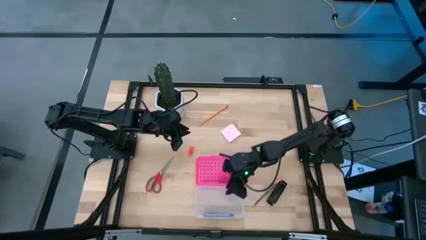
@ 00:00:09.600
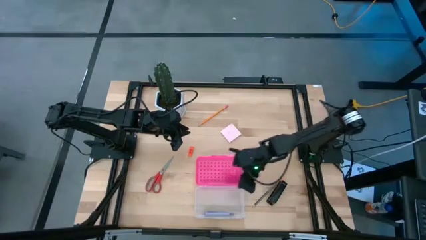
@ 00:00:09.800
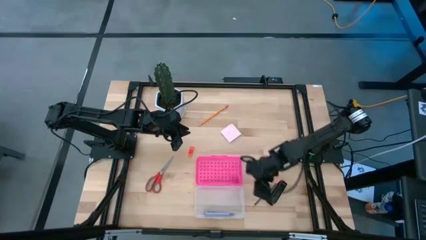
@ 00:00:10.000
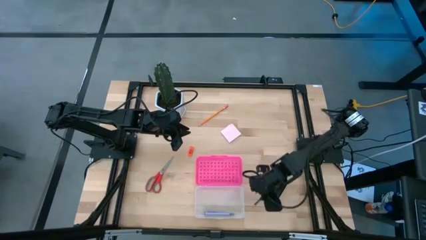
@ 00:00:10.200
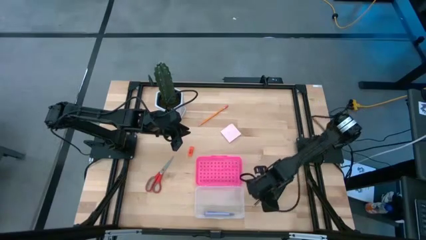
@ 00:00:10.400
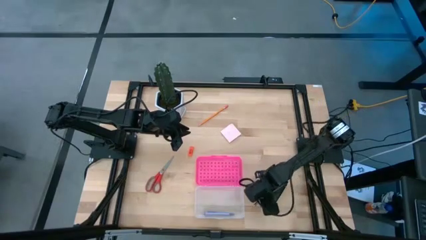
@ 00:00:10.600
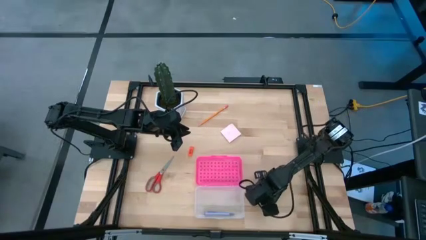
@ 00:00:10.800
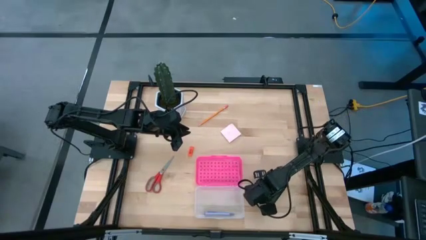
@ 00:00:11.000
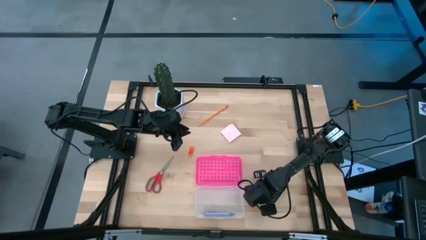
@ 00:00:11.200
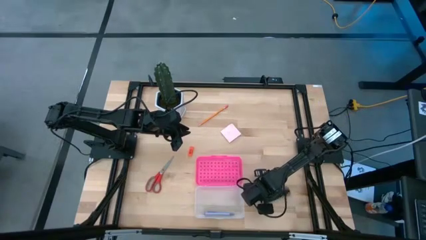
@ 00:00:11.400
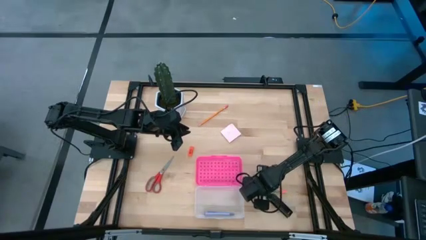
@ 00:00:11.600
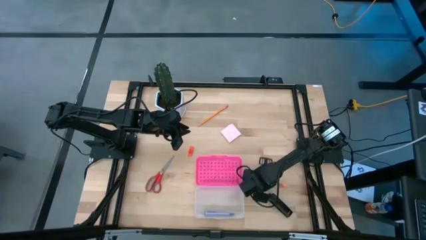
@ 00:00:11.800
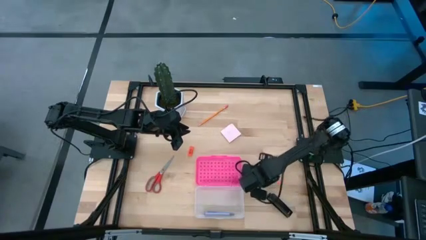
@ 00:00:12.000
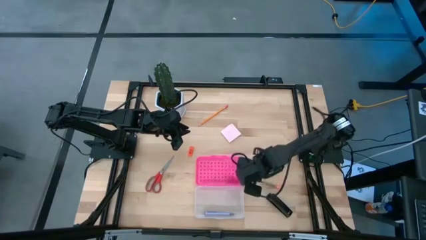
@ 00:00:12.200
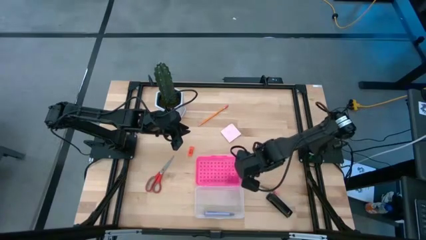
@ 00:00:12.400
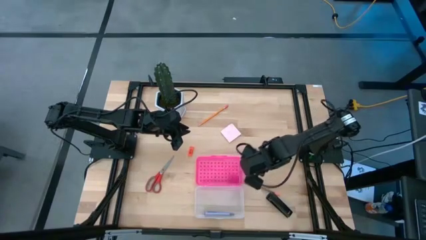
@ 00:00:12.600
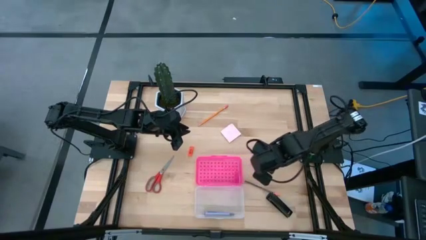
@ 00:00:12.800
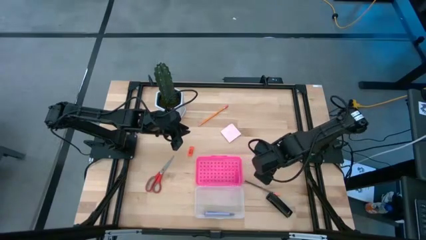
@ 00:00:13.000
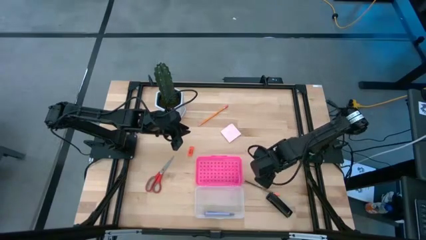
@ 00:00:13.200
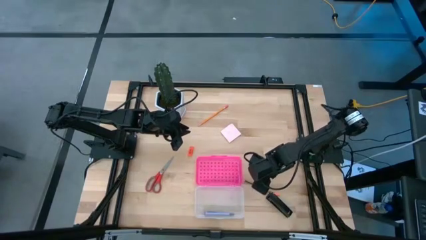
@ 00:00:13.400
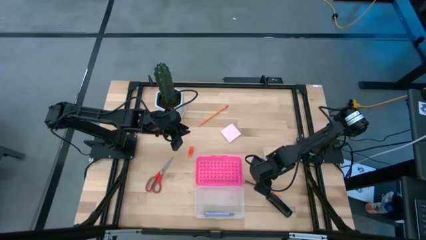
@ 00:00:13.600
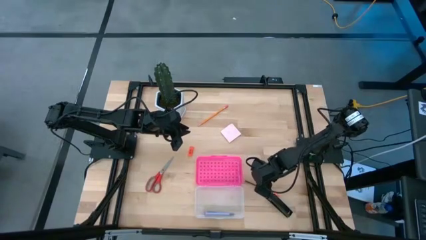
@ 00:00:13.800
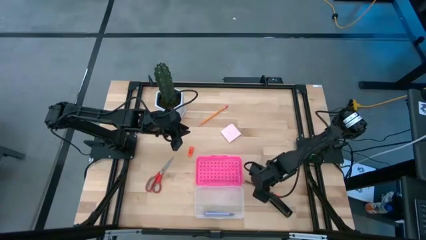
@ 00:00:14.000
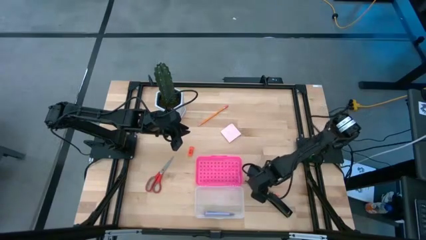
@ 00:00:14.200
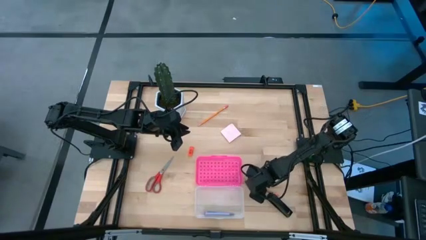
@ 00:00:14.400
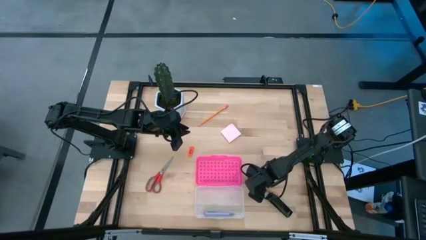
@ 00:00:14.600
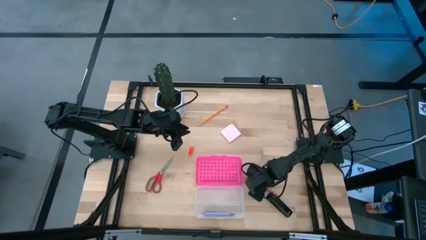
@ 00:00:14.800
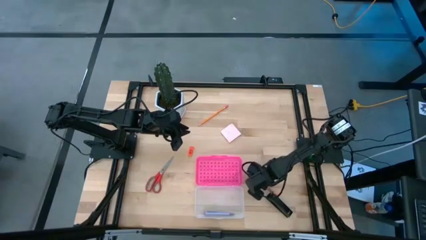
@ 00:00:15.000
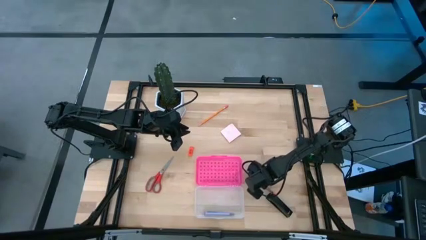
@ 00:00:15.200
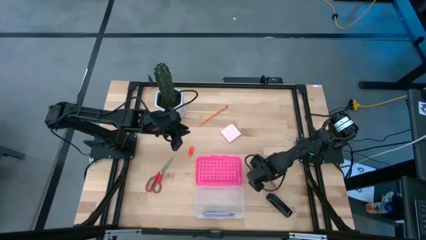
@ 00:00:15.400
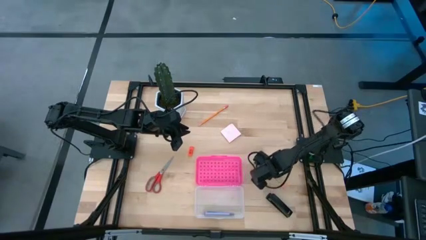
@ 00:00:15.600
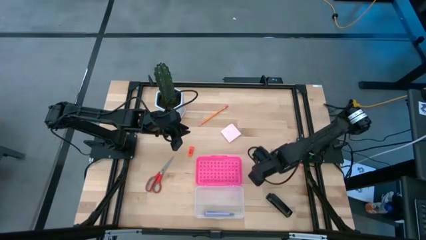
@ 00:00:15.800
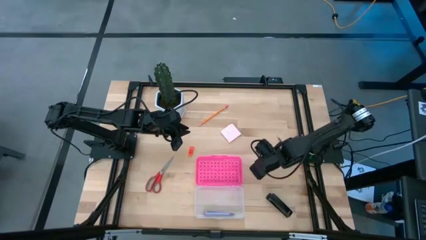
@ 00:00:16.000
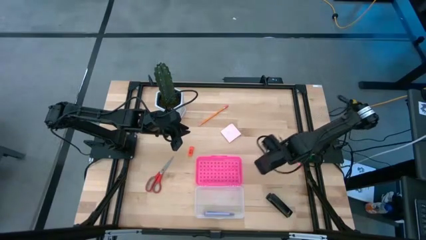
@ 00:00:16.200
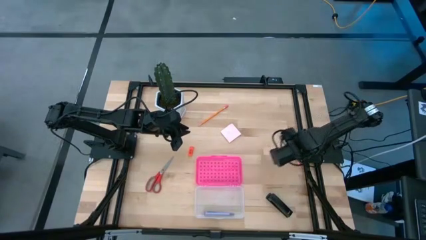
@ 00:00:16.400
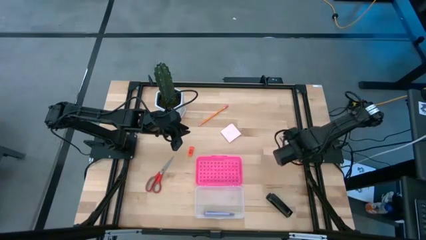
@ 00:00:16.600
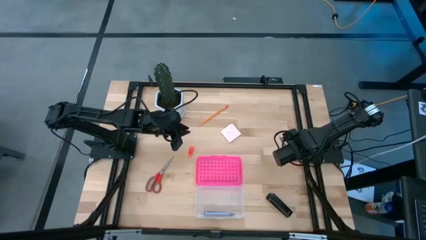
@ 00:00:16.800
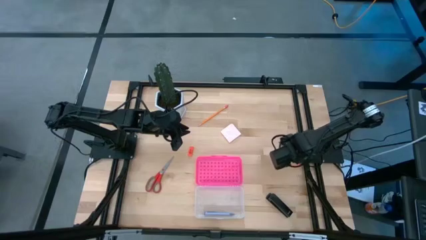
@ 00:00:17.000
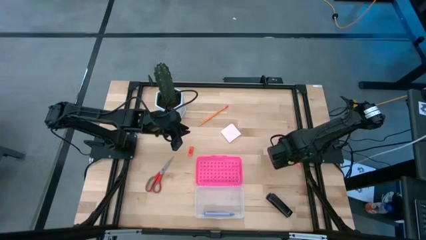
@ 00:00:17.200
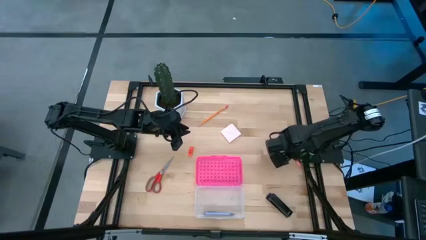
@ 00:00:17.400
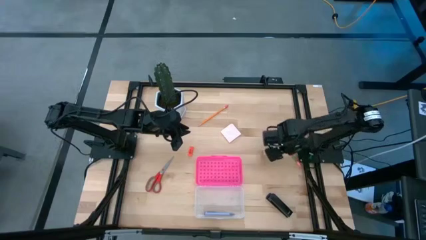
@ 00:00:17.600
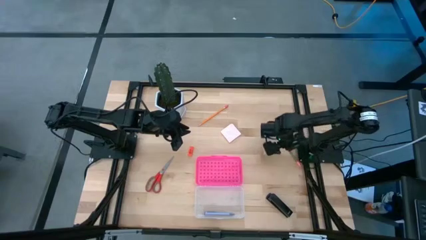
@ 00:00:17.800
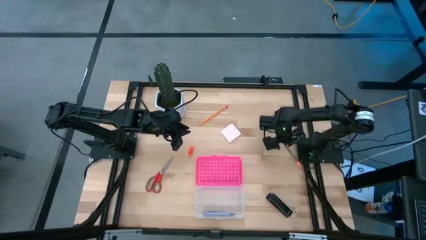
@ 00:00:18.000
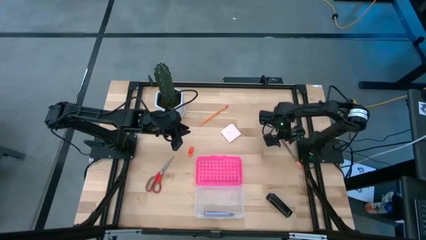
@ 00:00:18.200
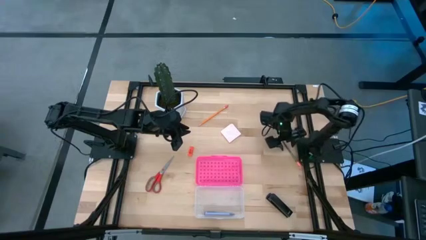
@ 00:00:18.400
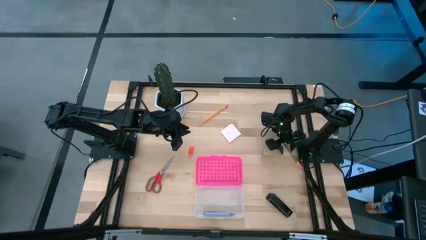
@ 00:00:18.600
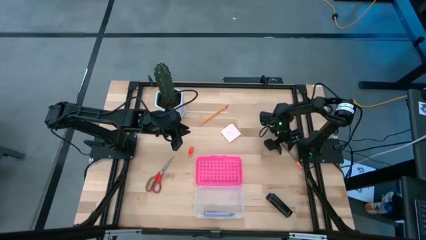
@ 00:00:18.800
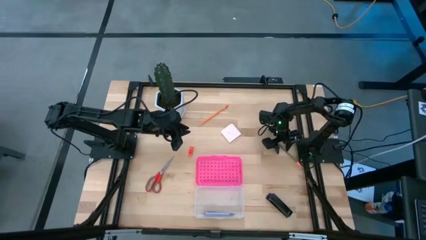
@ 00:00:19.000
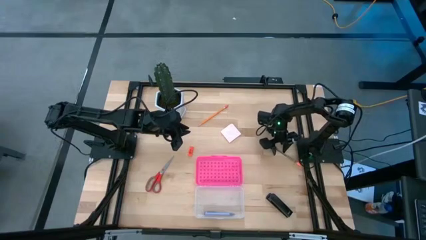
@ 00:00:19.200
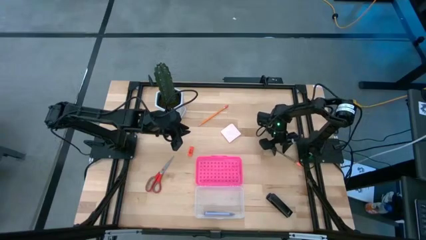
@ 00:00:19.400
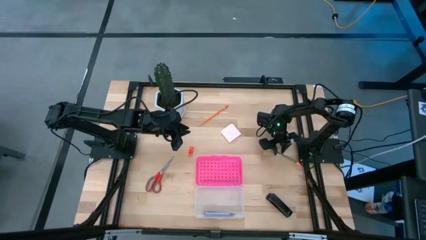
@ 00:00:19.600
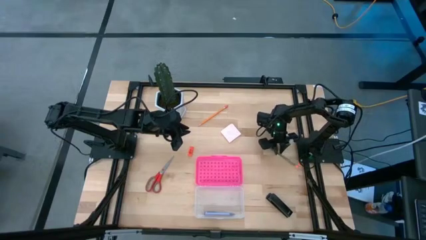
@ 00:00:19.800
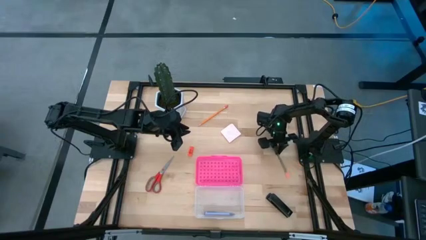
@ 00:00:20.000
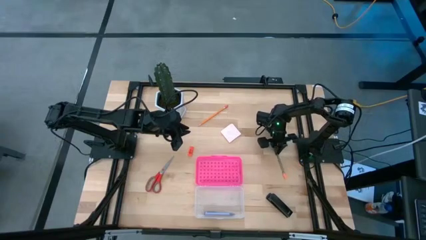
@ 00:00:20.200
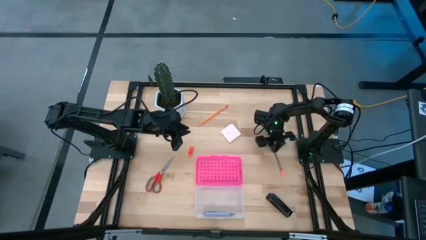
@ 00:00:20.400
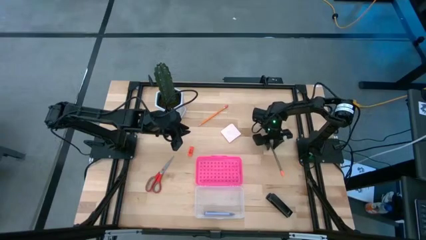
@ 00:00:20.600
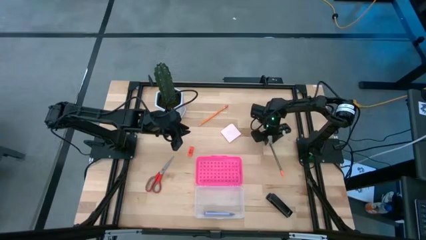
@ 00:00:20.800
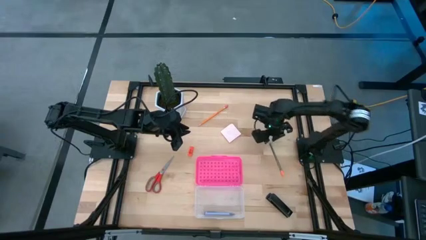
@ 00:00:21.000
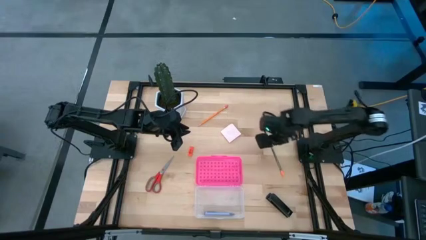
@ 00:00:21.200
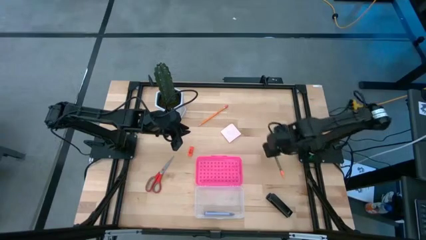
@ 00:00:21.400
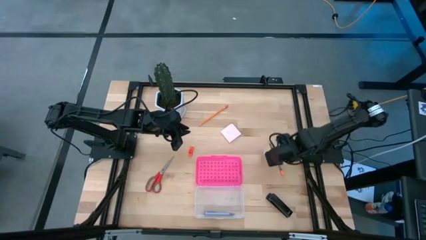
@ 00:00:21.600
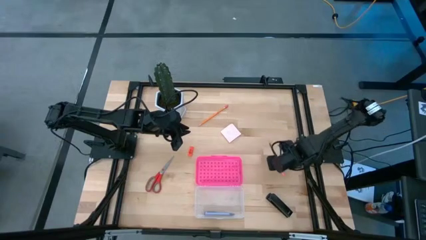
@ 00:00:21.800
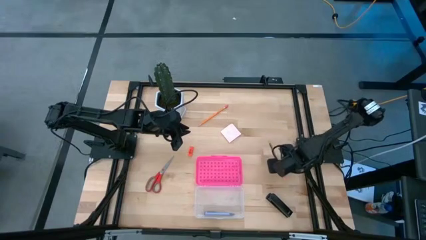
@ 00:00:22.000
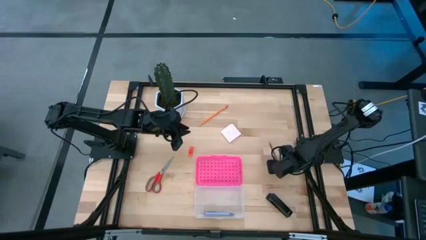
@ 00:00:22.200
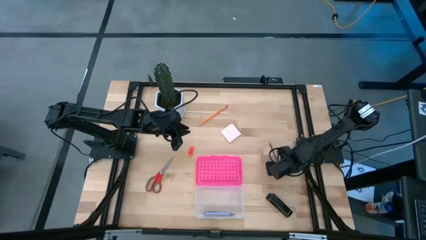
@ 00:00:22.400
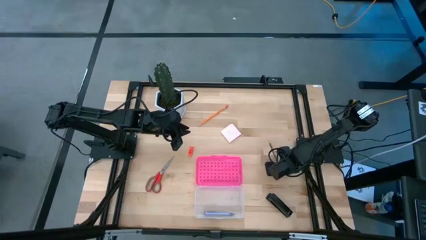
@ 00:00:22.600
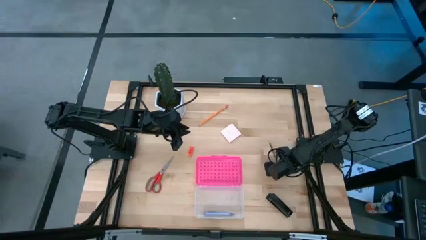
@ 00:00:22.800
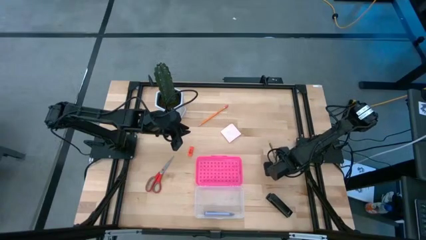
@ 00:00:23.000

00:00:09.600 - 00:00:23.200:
Task: Pack school essentials
Put the black pencil into the pencil case

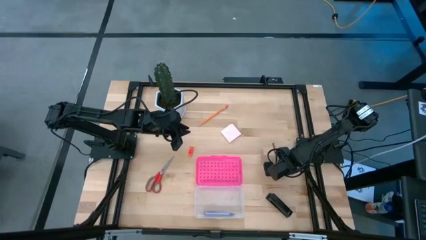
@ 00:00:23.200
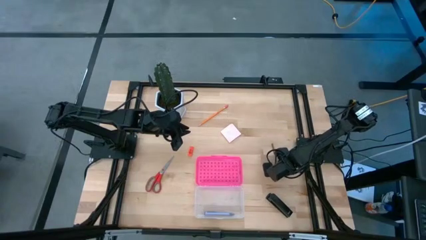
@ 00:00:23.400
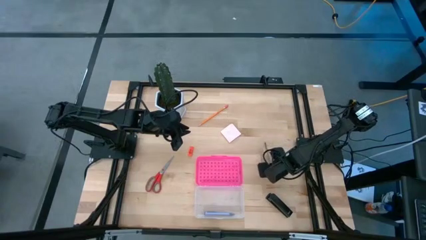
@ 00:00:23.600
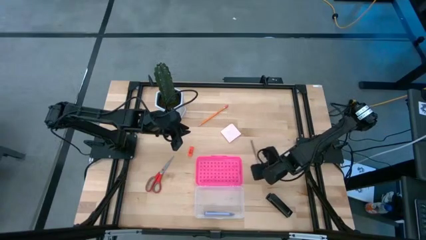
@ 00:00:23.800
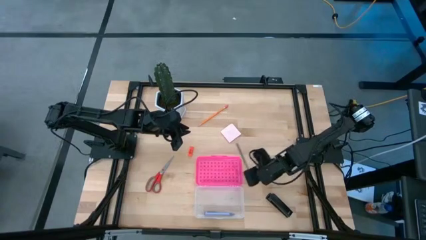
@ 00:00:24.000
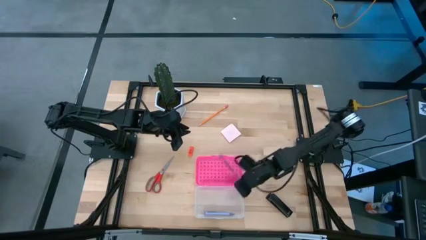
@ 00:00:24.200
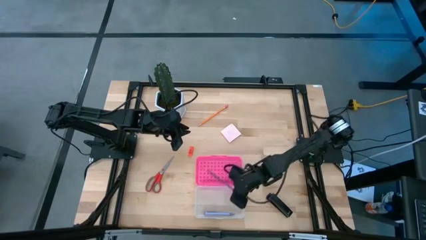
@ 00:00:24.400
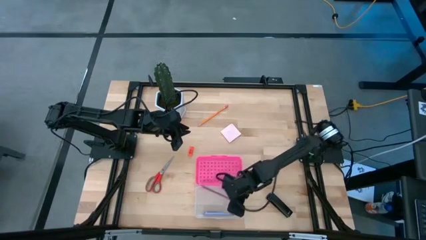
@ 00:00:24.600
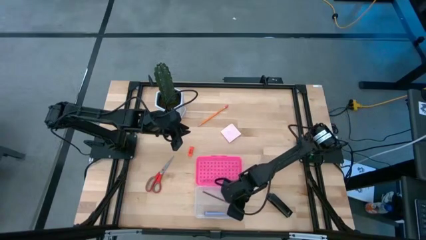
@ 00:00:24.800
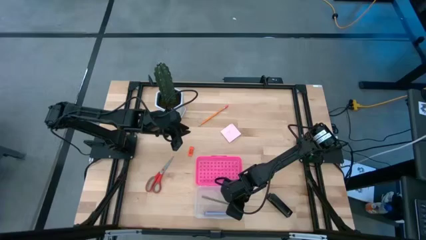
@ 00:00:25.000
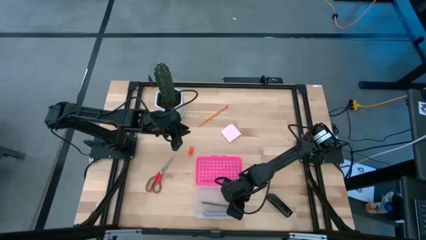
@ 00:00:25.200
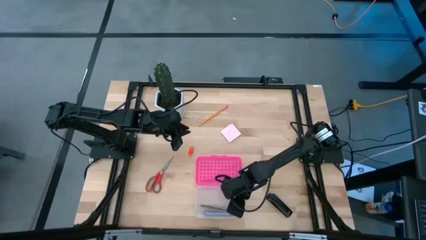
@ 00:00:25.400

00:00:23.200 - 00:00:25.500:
Put the black pencil into the pencil case
